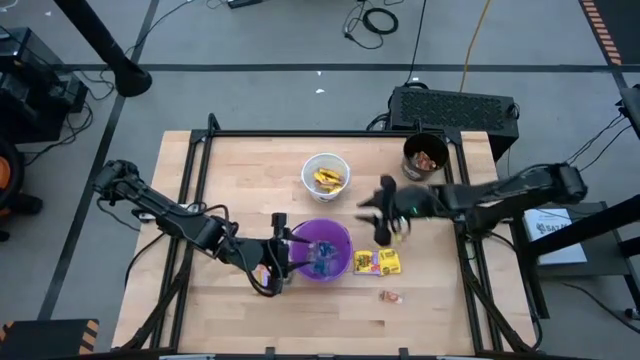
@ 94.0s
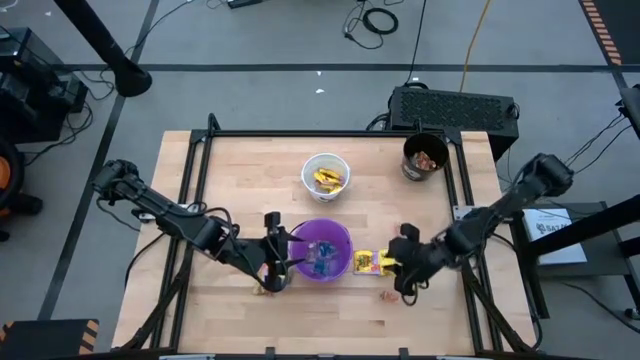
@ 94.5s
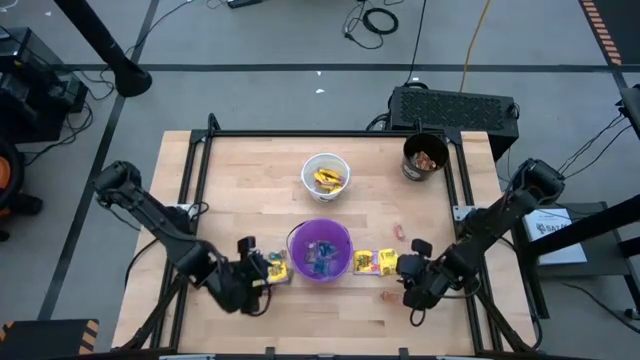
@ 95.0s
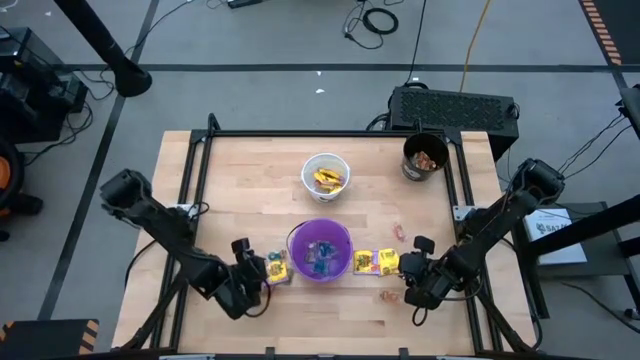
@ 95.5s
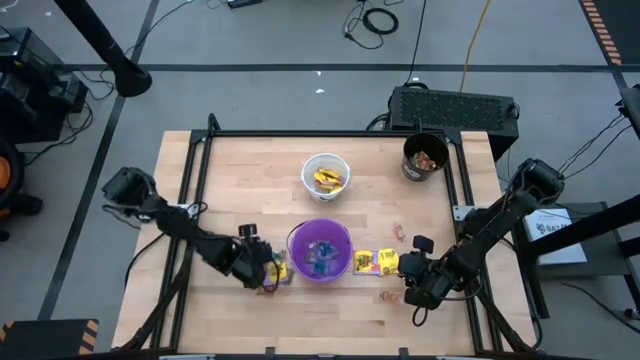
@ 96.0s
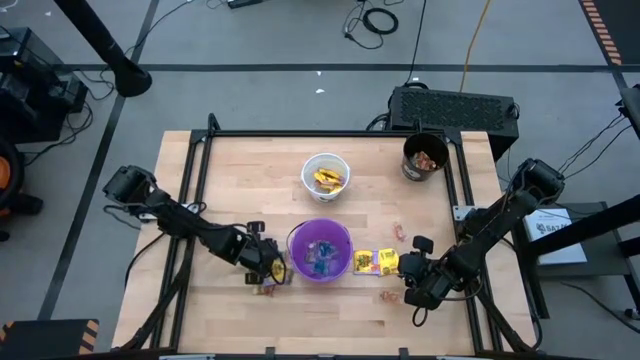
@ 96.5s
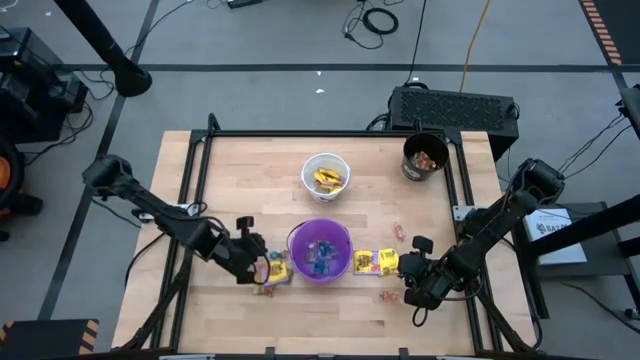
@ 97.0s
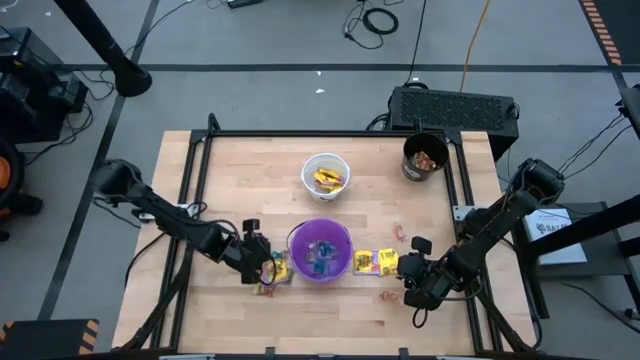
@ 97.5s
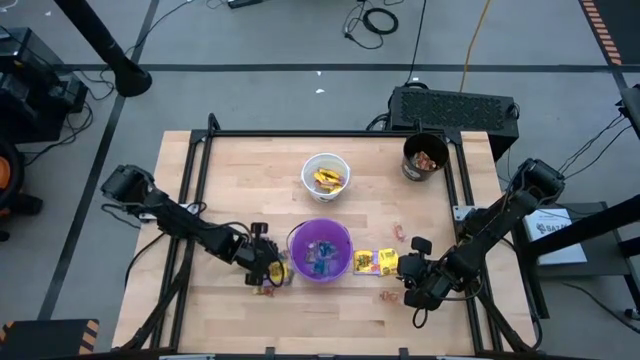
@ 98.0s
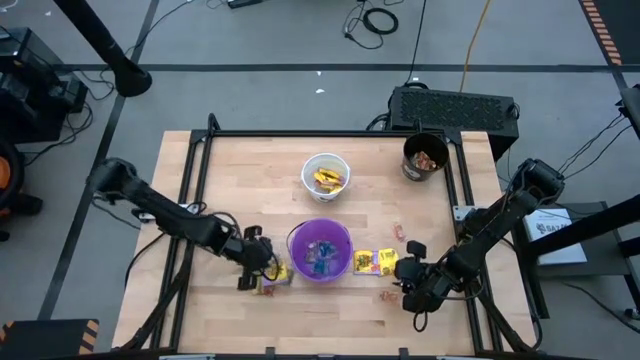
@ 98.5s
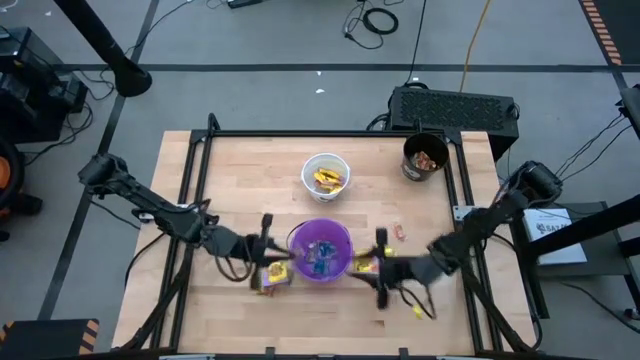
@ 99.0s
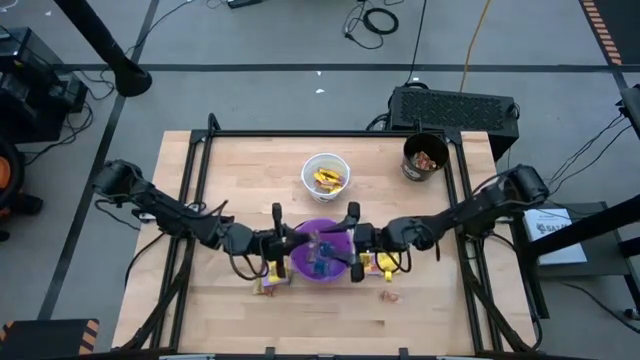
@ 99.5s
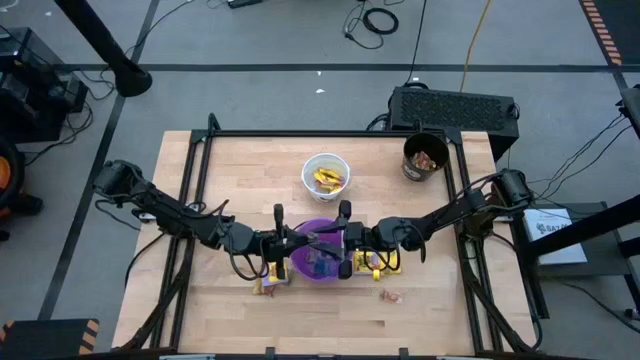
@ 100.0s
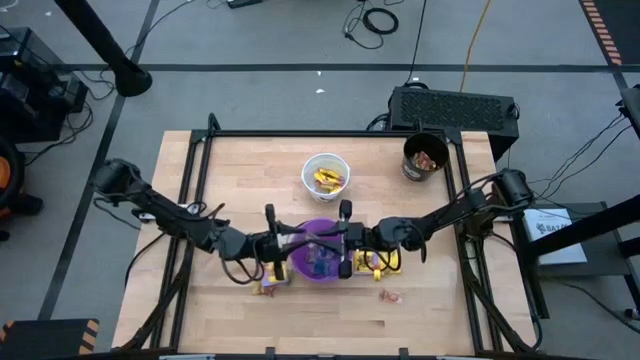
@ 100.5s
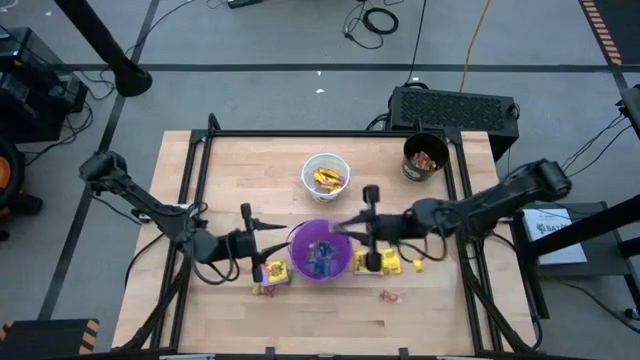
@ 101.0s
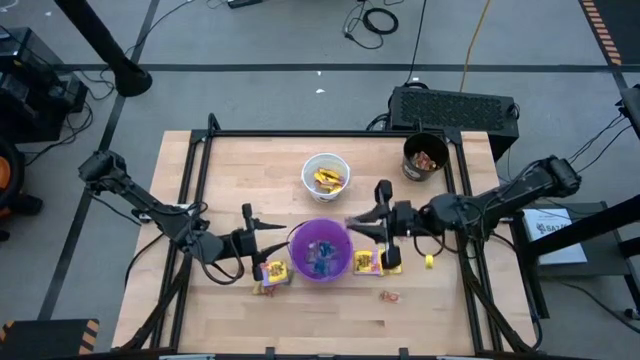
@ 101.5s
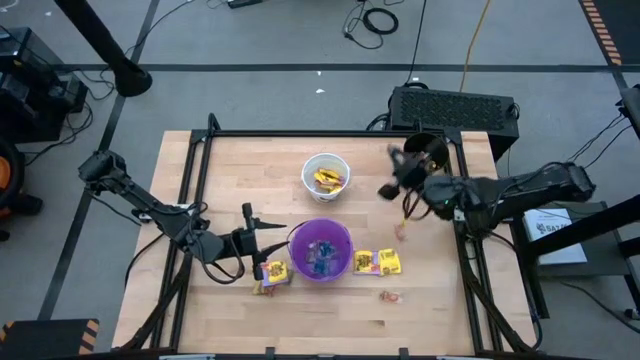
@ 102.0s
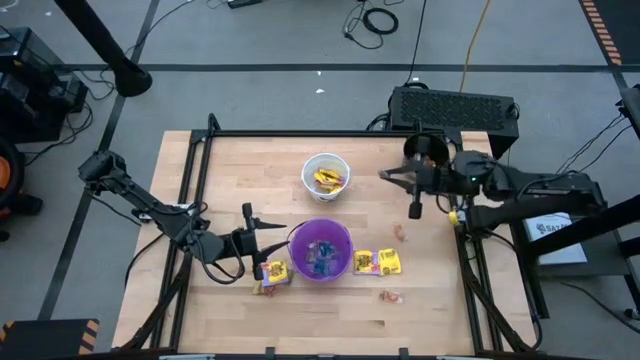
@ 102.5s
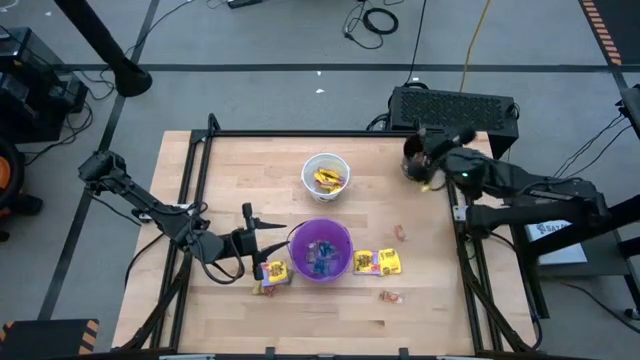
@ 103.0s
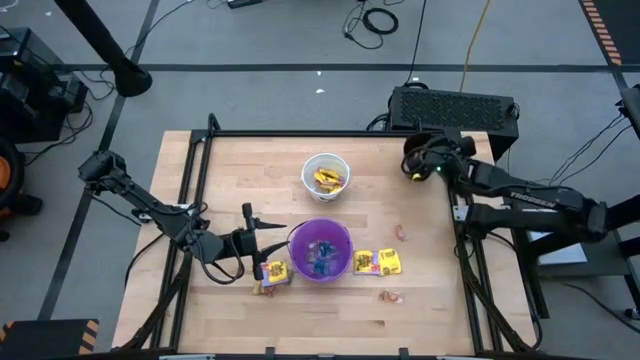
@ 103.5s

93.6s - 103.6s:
Task: Sort candy by brand, put in halloween buckets
Put the blue gummy into the black bucket

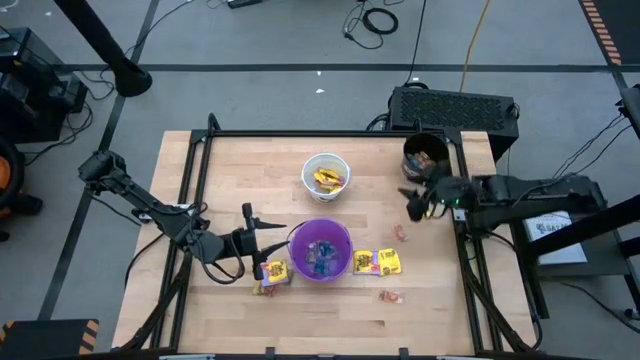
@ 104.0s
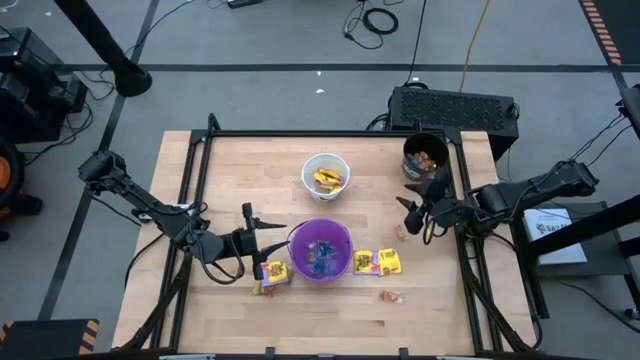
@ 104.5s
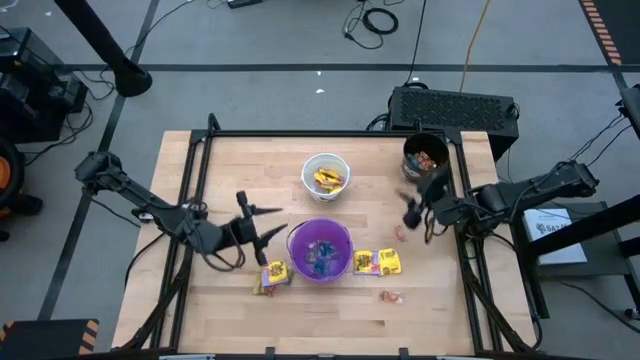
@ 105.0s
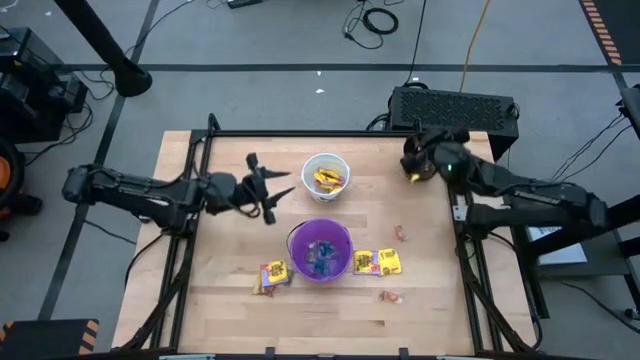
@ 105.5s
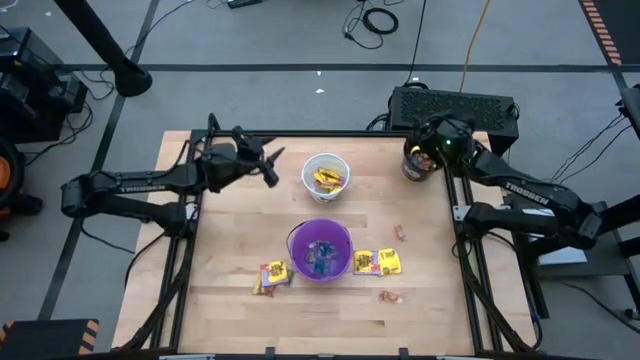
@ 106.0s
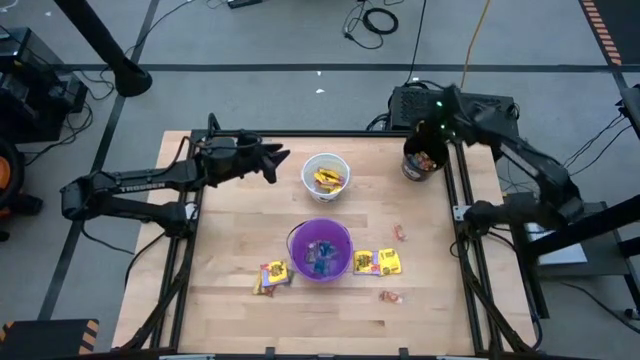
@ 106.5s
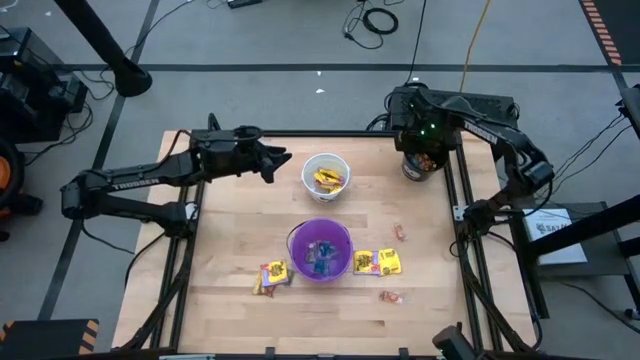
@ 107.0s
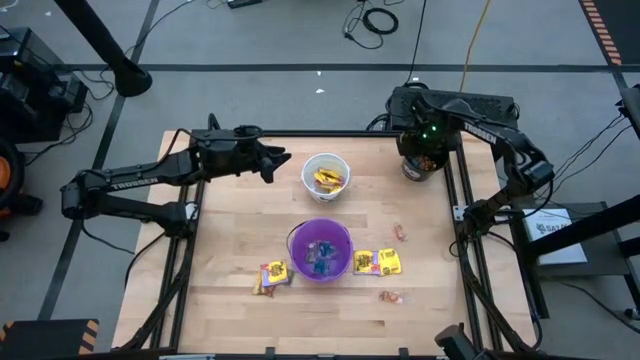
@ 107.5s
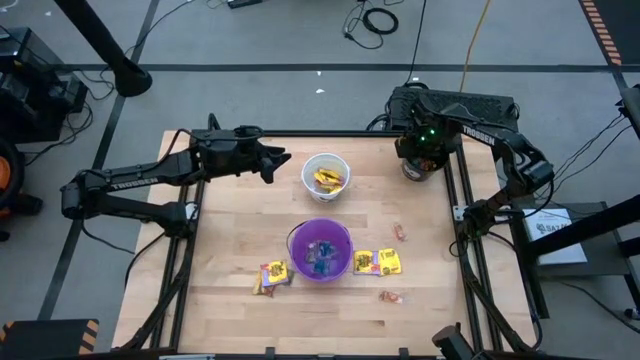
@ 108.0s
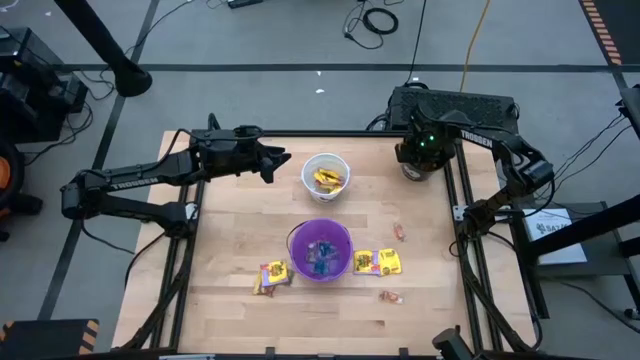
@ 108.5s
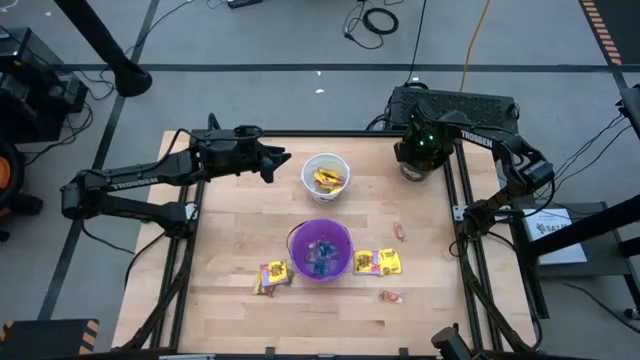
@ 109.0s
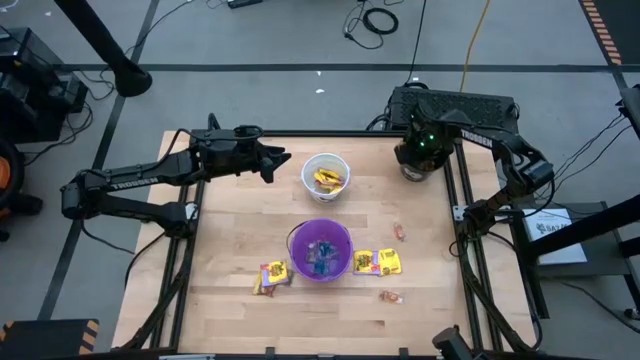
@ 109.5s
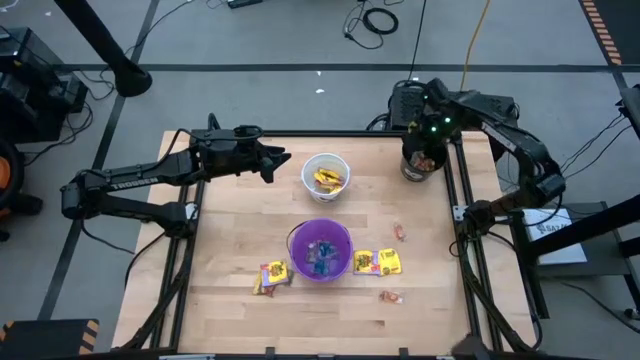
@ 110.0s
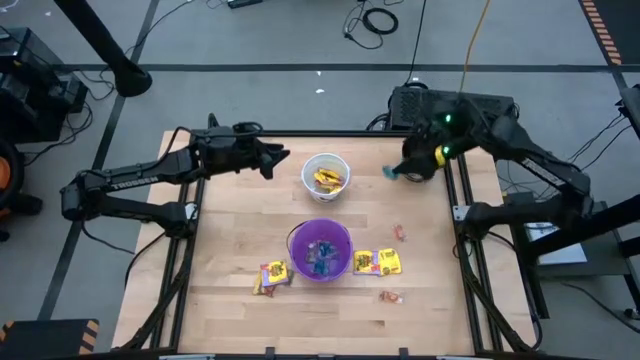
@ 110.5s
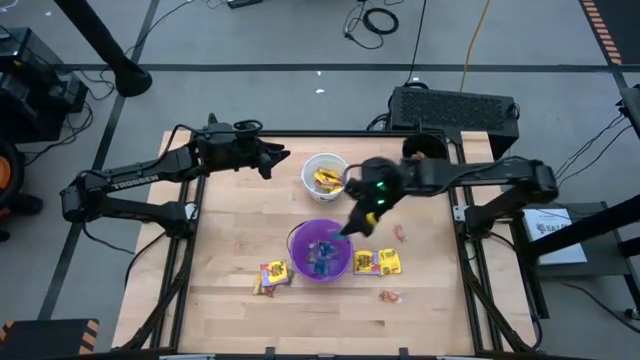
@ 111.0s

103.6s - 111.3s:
Put the blue gummy from the black bucket into the violet bucket

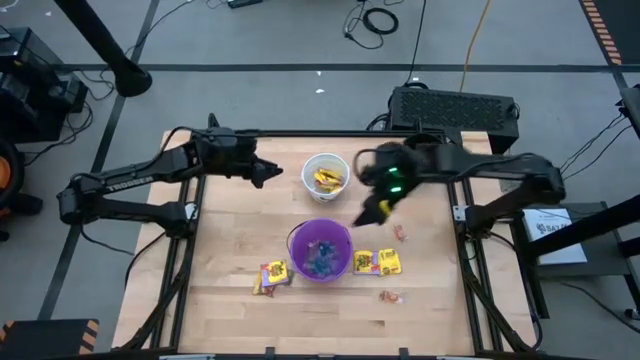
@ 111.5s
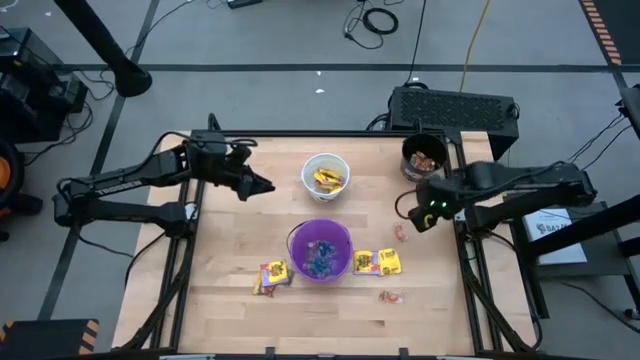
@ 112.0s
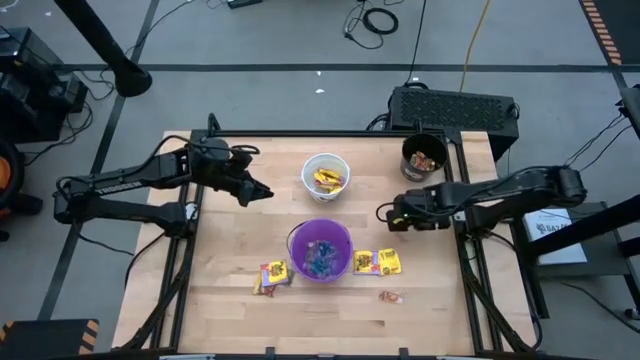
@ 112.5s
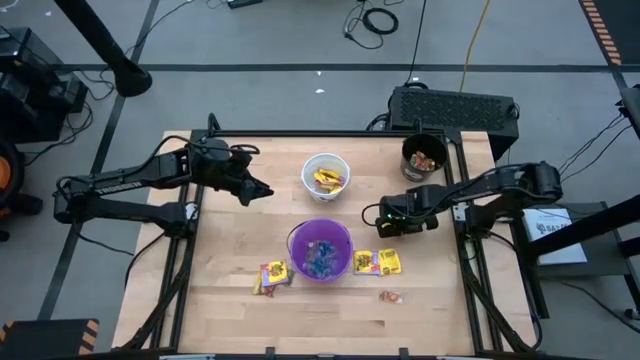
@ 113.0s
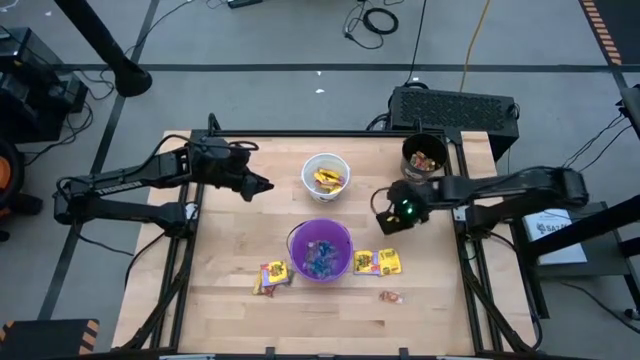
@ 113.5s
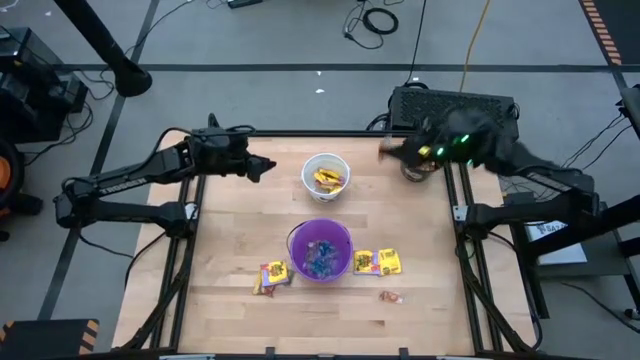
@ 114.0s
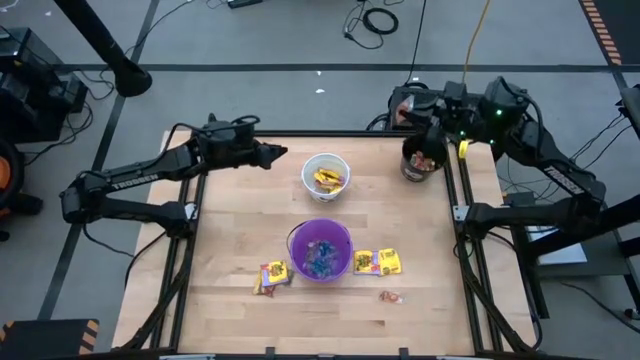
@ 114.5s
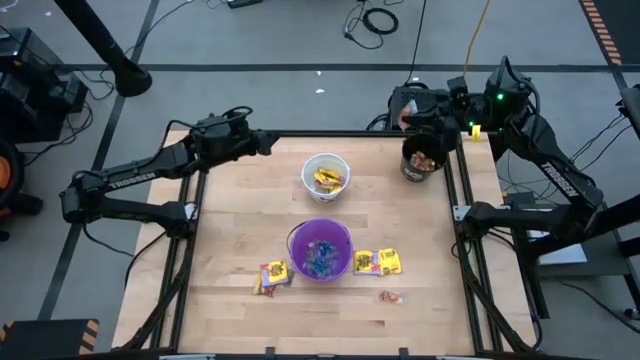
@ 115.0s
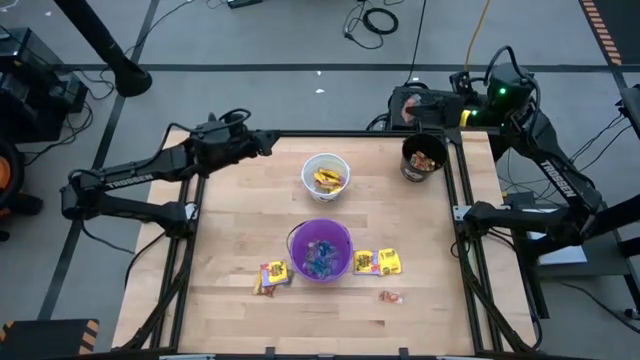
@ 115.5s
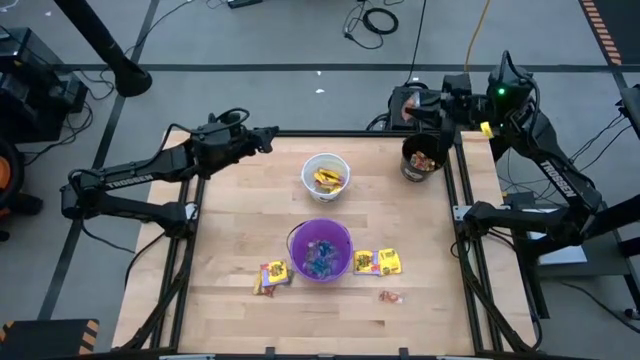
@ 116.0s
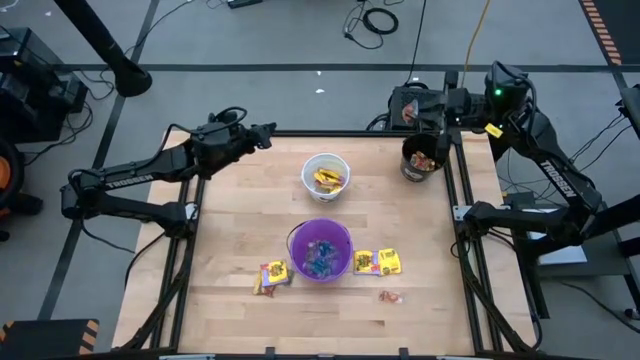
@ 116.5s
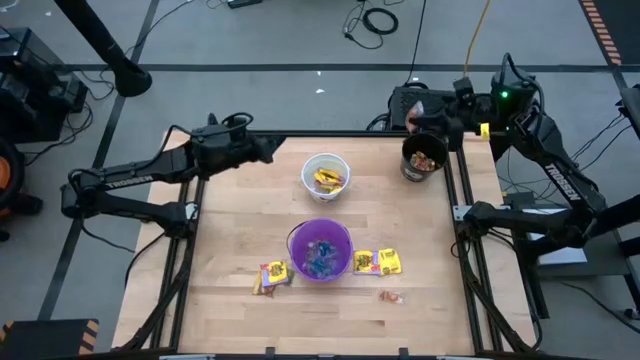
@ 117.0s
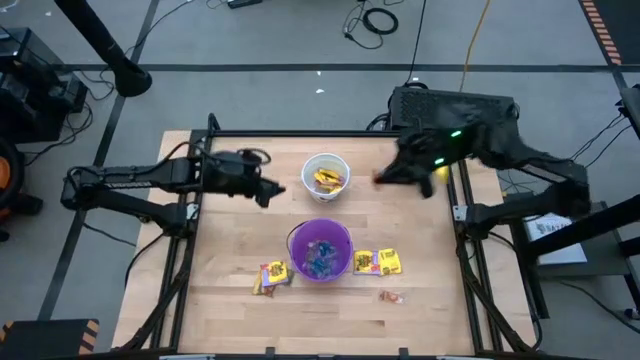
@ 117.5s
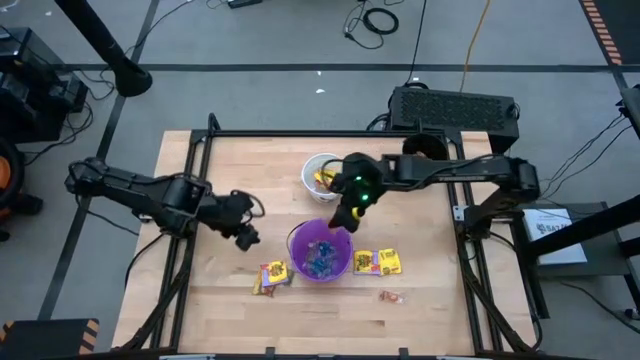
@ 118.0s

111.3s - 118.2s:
Put the orange gummy into the violet bucket
